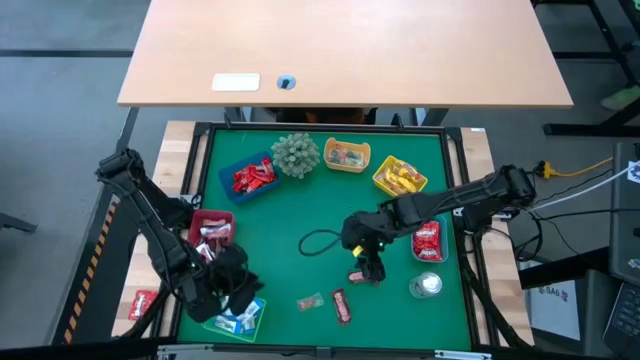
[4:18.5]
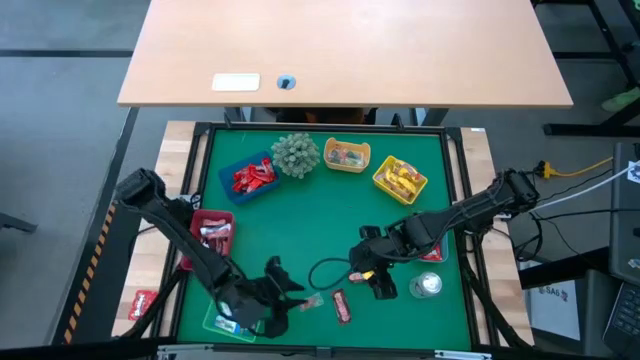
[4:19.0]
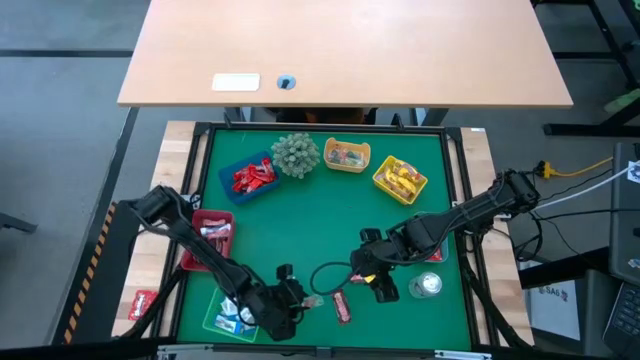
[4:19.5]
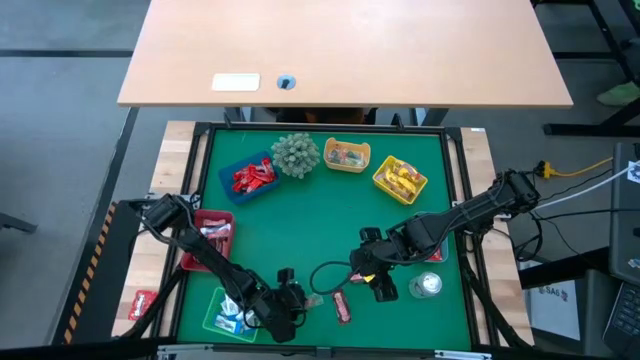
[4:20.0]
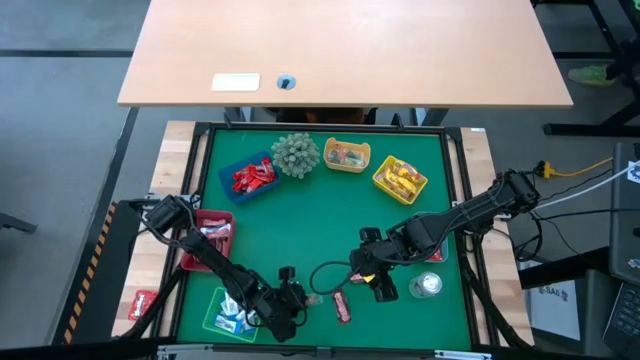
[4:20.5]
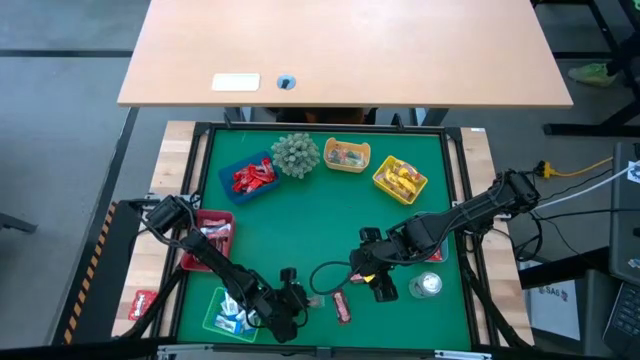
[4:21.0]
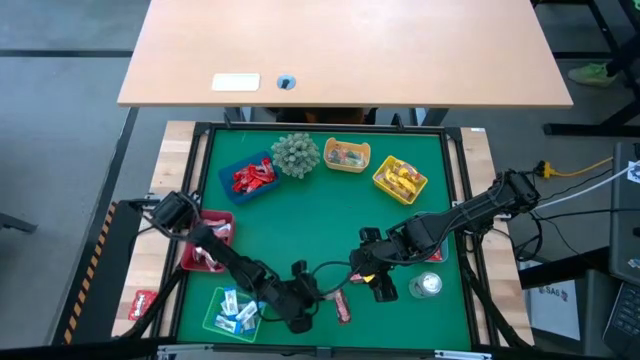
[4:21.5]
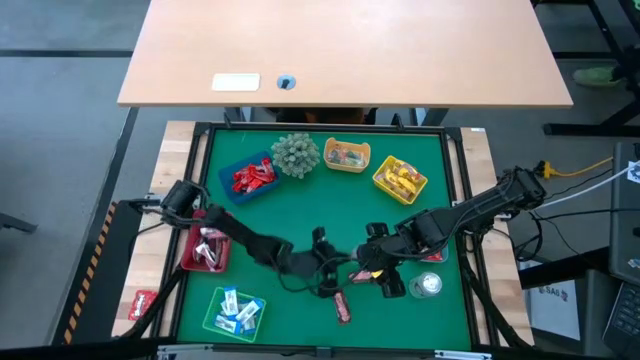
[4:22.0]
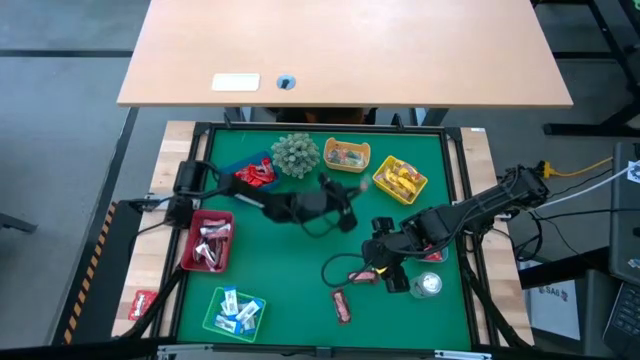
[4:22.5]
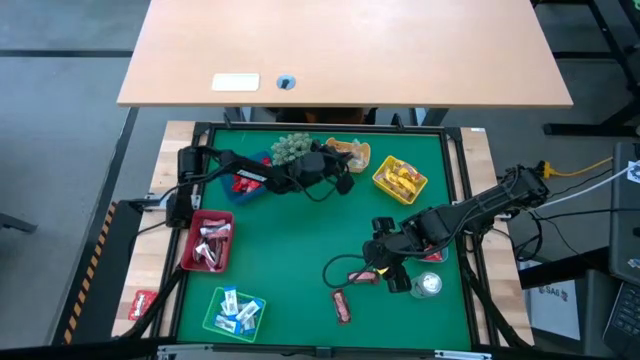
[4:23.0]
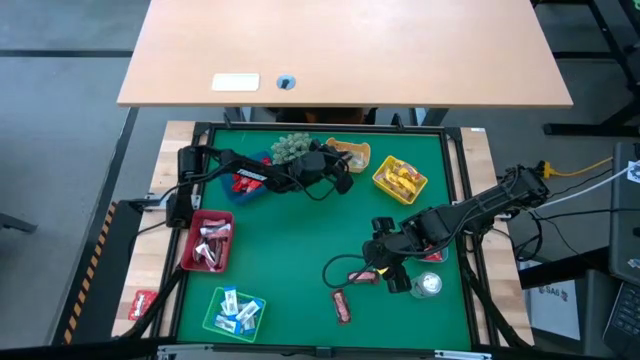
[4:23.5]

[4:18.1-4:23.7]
Task: Sort candy
Put the orange gummy into the orange bin

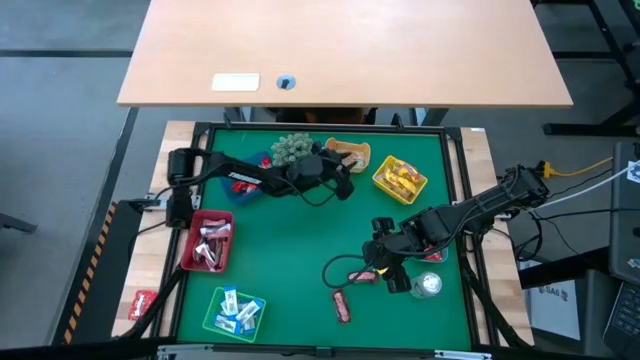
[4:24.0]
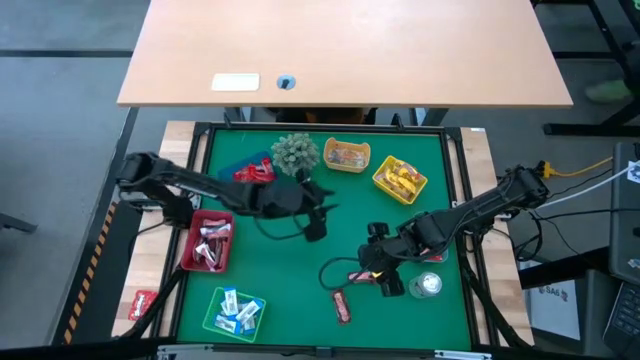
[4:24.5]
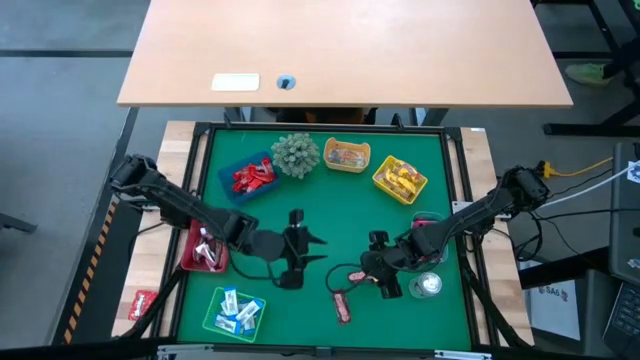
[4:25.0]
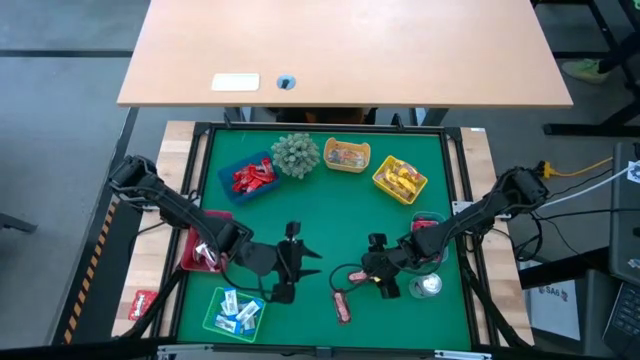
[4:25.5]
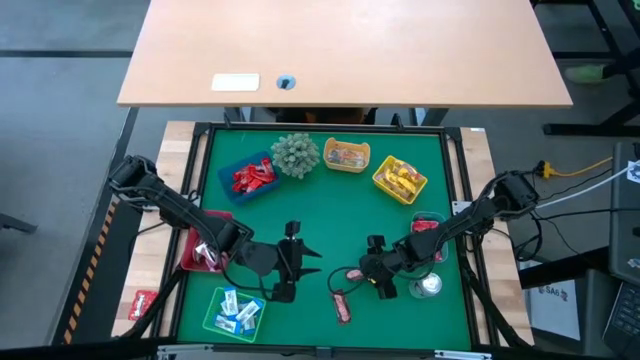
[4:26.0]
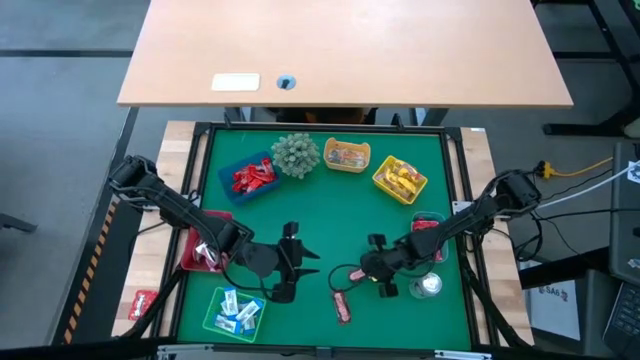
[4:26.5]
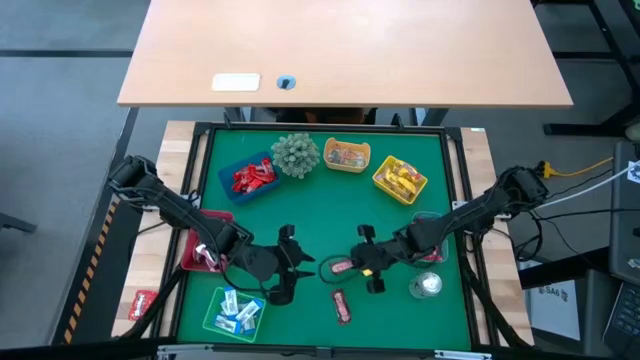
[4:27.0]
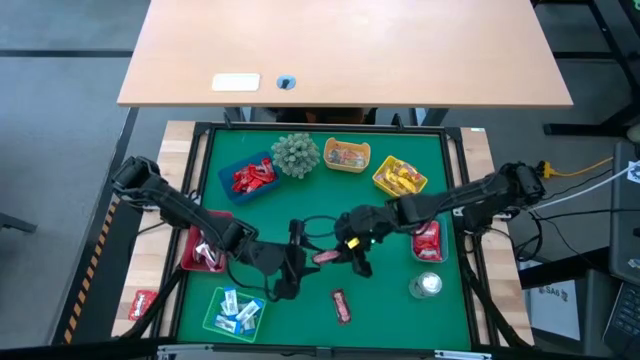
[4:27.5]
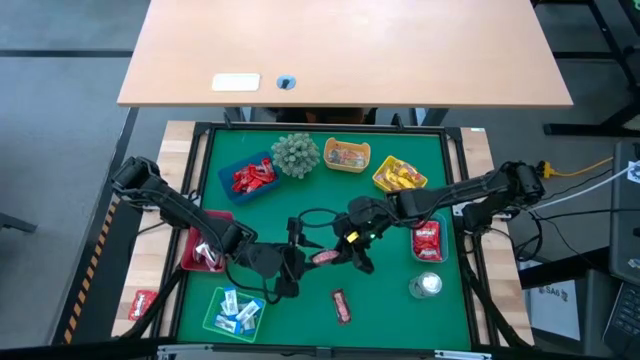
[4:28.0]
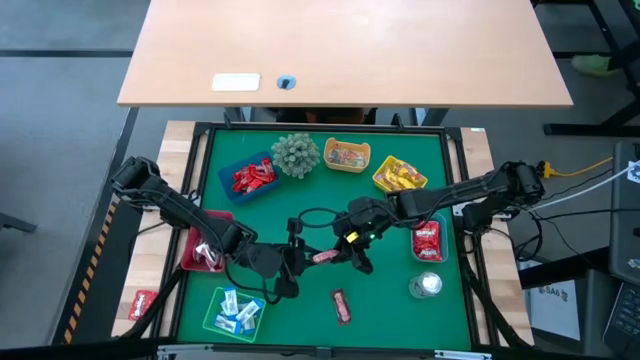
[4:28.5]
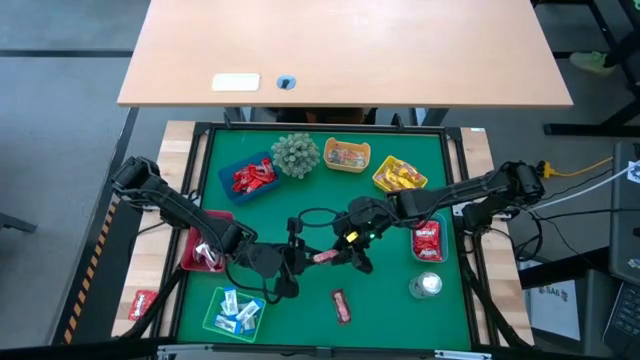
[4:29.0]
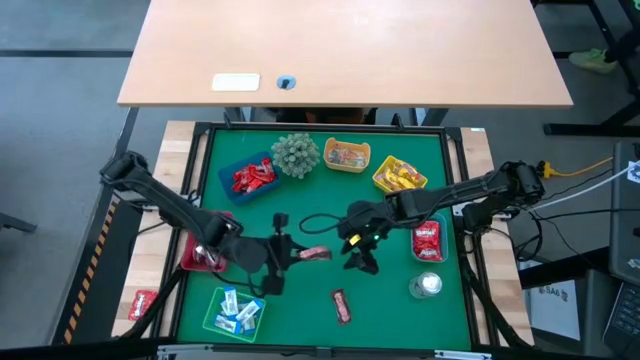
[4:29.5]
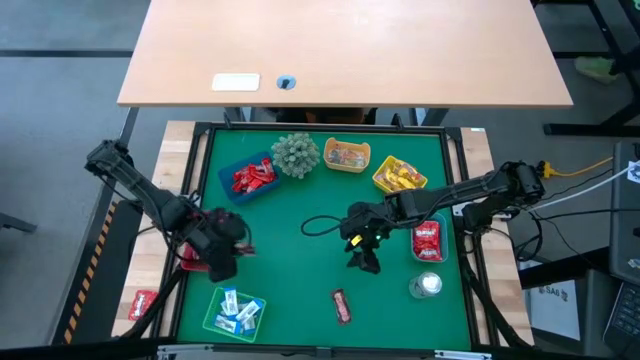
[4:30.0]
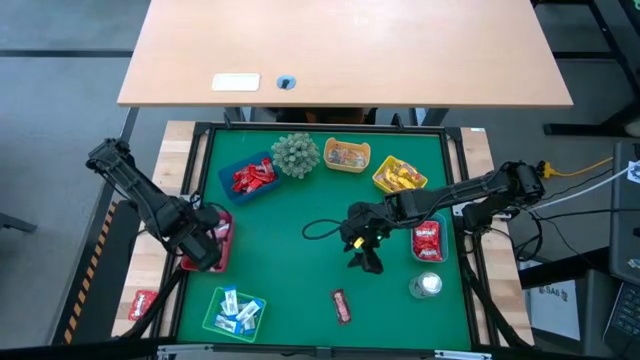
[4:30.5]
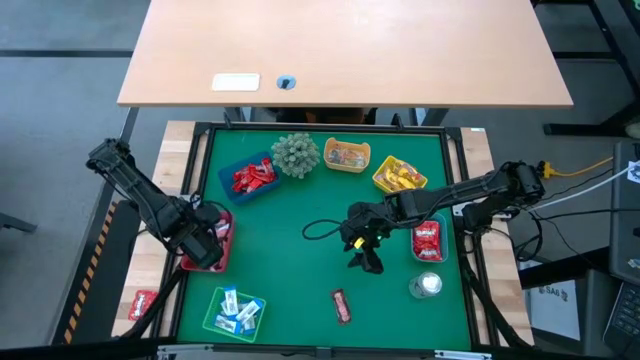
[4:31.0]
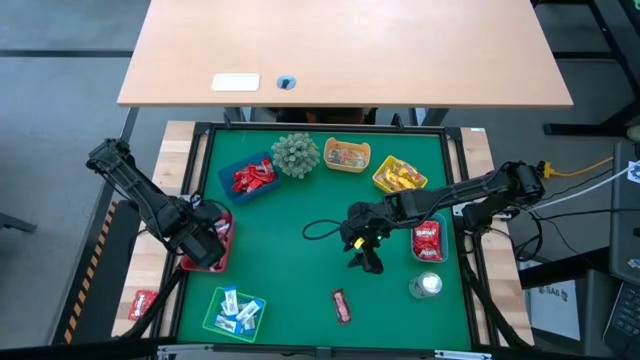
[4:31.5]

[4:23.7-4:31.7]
Put the brown chocolate into the red bin

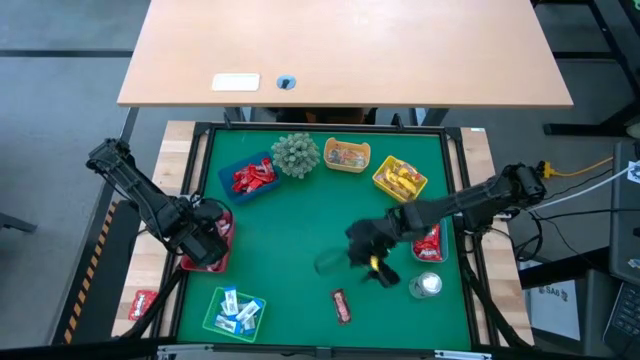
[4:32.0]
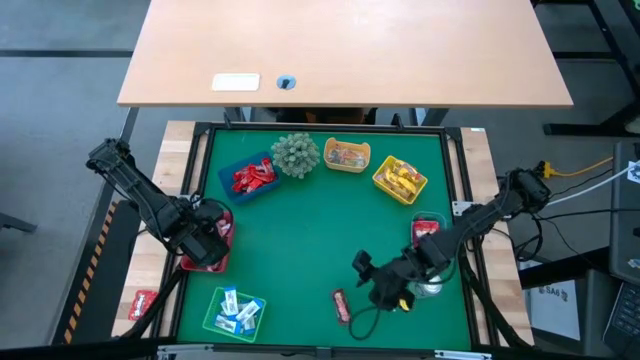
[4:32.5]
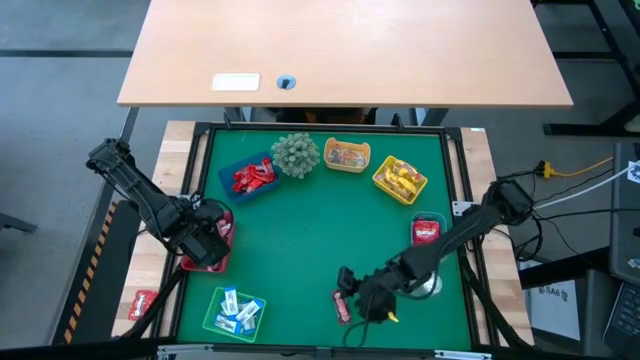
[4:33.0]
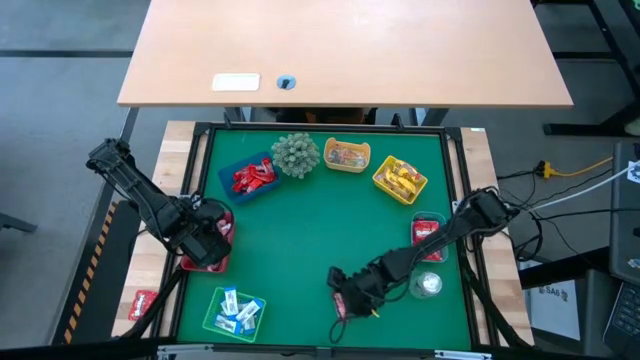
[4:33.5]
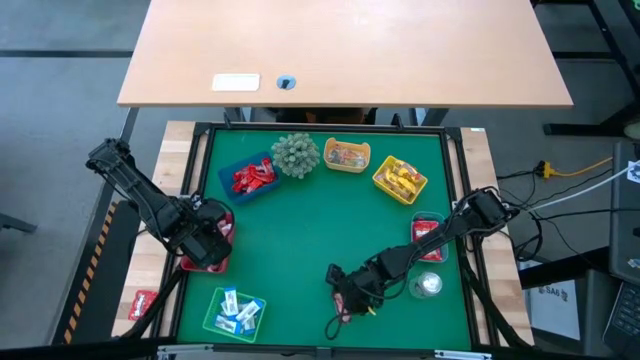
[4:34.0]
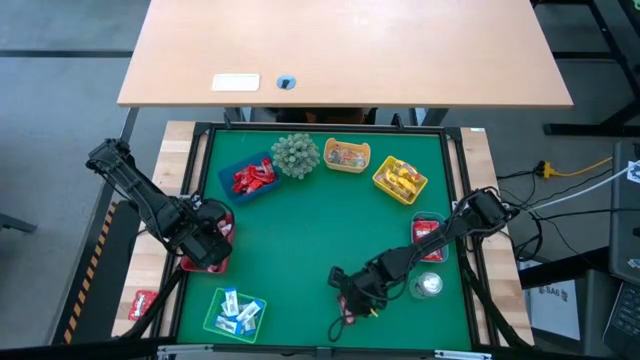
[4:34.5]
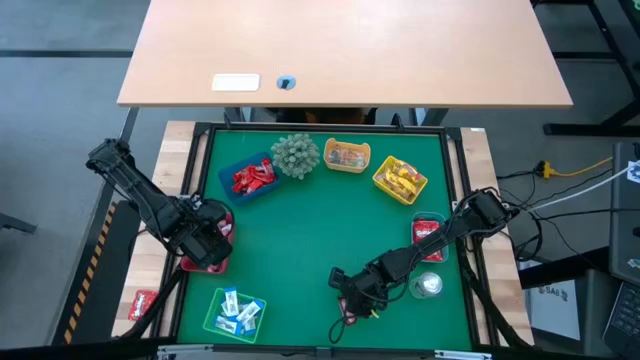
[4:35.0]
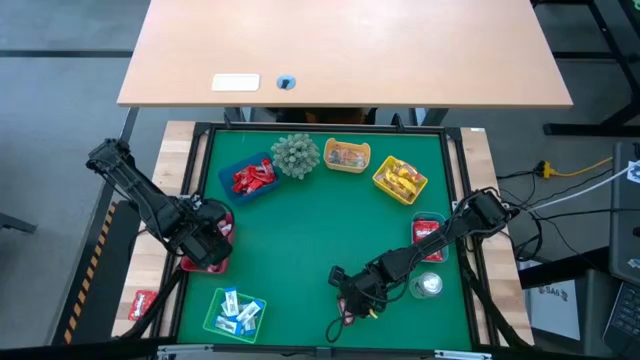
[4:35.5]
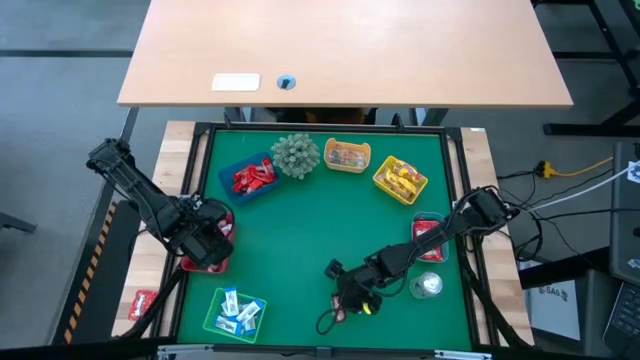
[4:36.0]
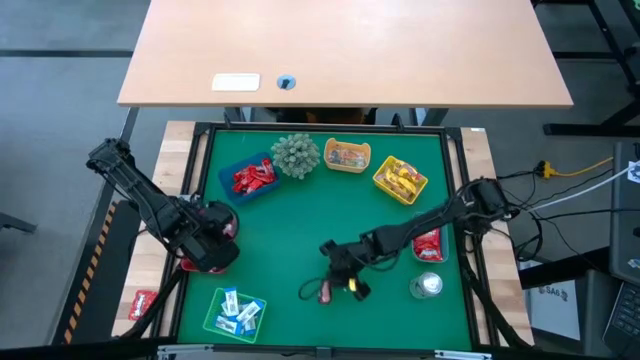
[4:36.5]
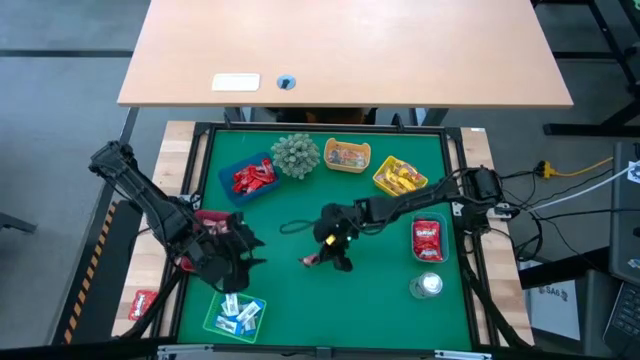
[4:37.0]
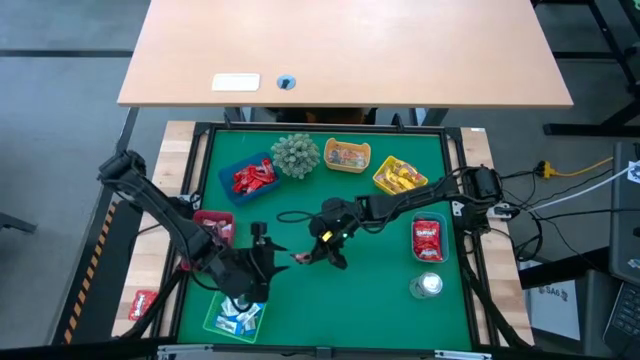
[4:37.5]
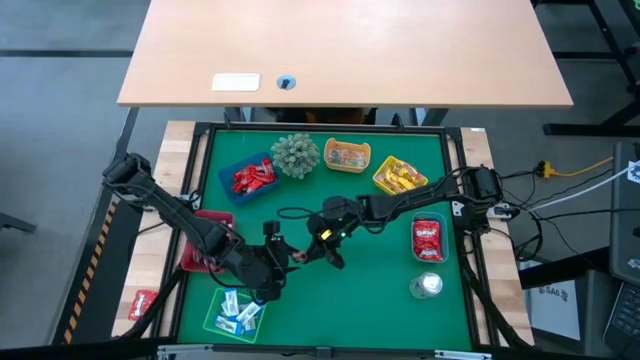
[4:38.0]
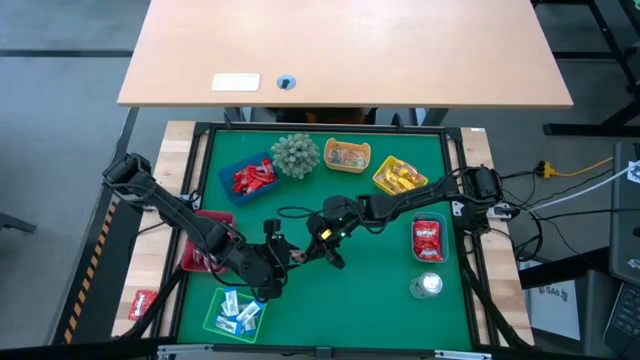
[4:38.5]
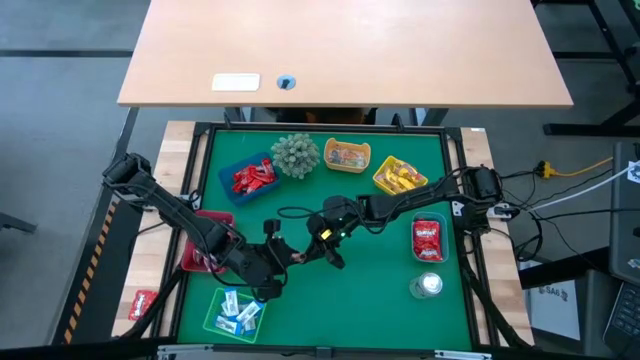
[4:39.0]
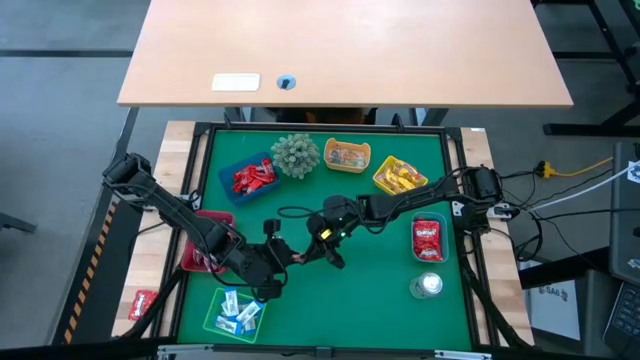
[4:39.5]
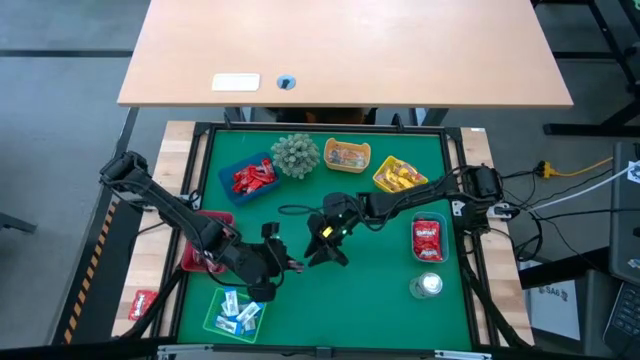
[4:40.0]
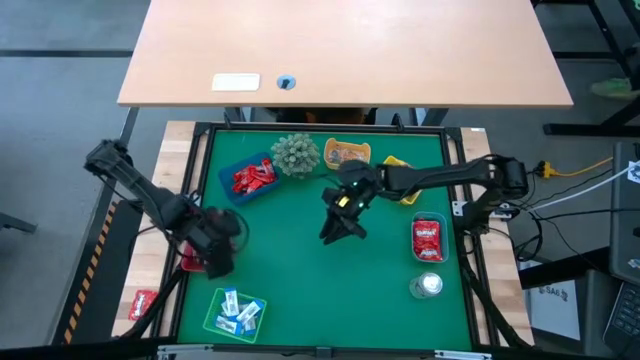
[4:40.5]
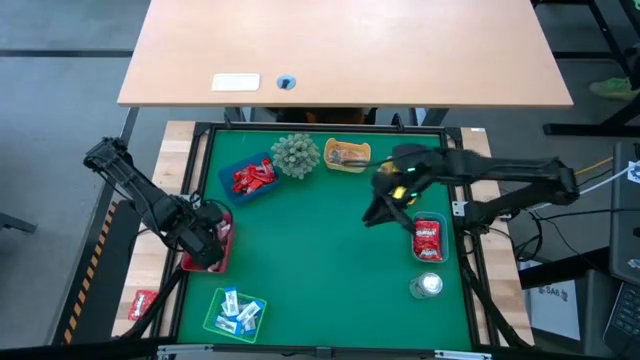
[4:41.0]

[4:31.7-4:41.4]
Put the brown chocolate into the red bin
